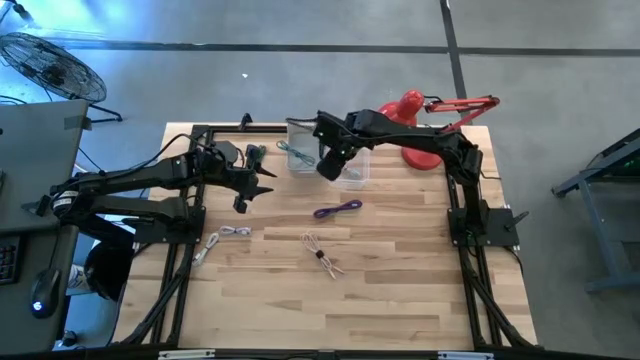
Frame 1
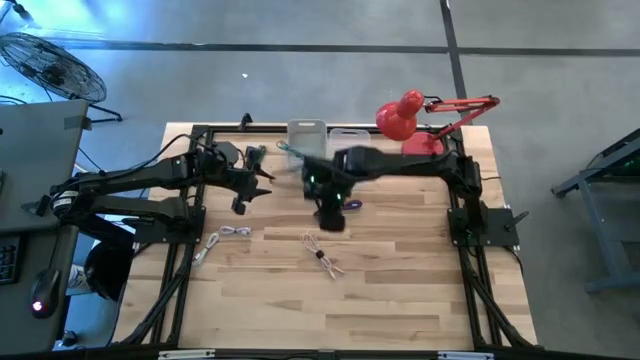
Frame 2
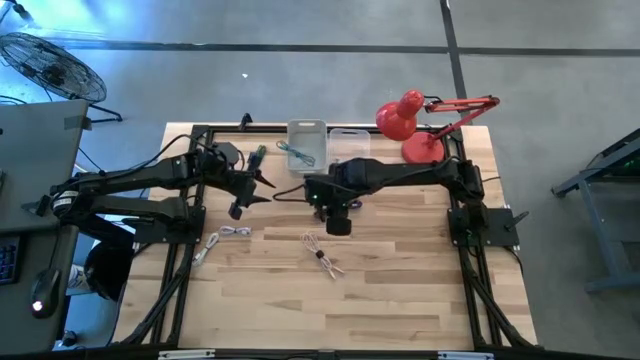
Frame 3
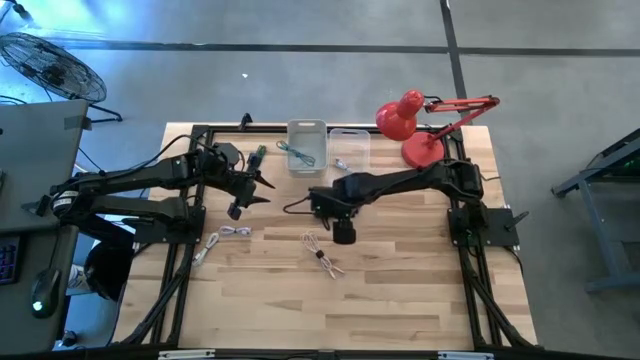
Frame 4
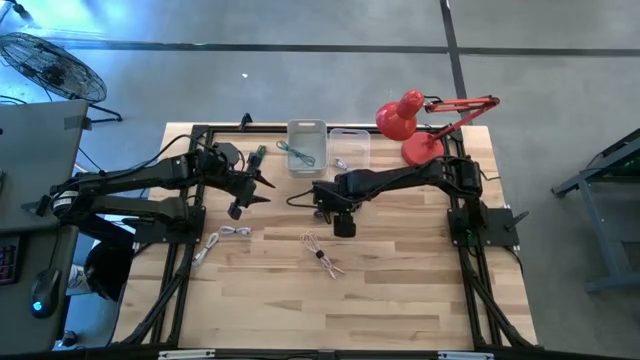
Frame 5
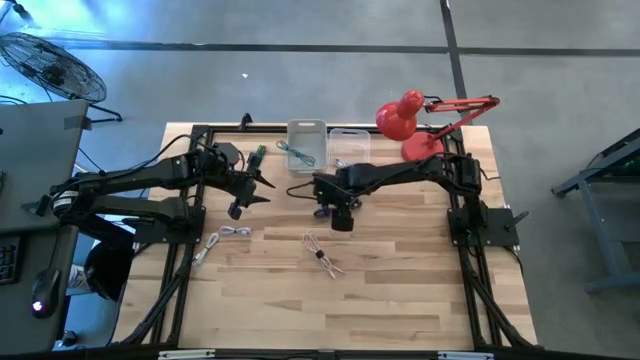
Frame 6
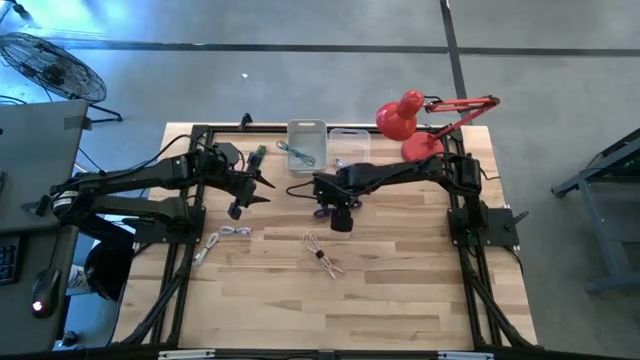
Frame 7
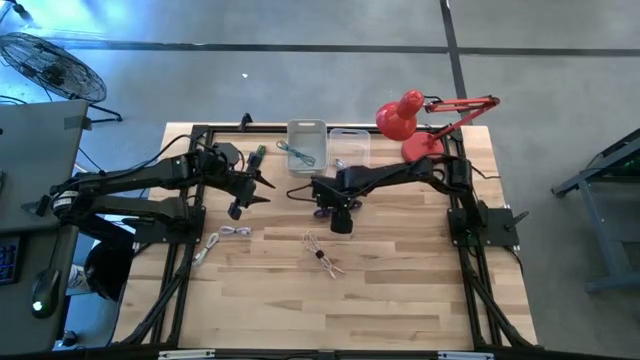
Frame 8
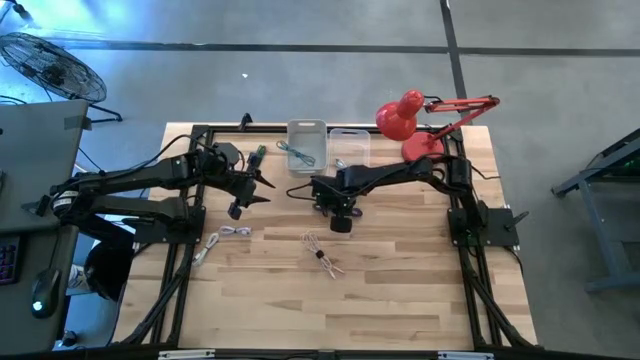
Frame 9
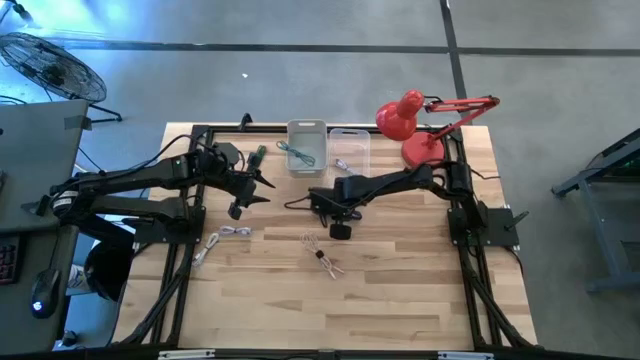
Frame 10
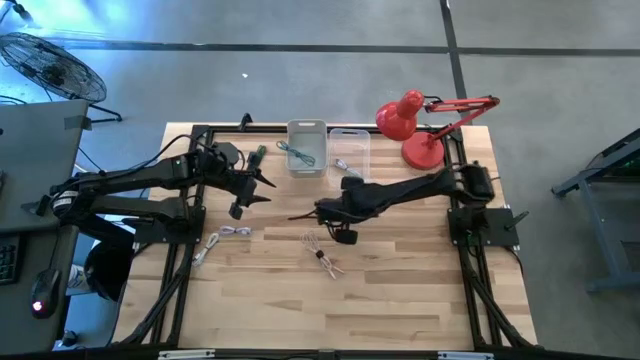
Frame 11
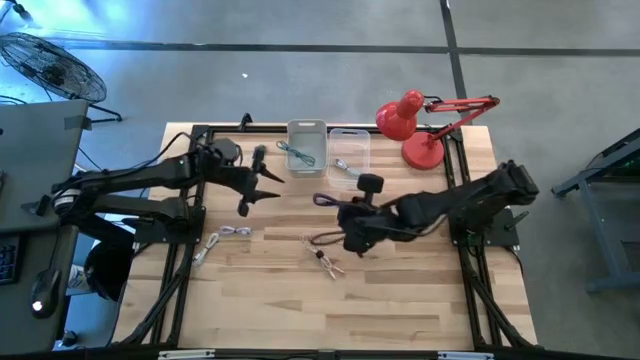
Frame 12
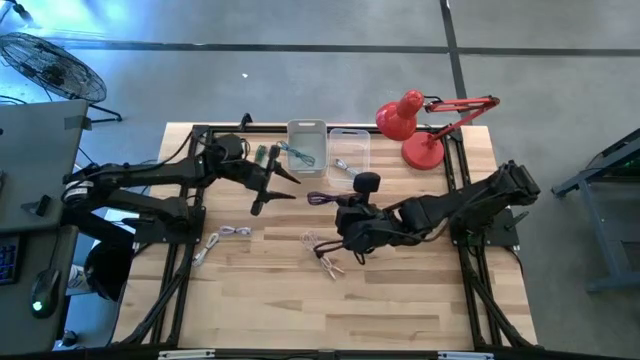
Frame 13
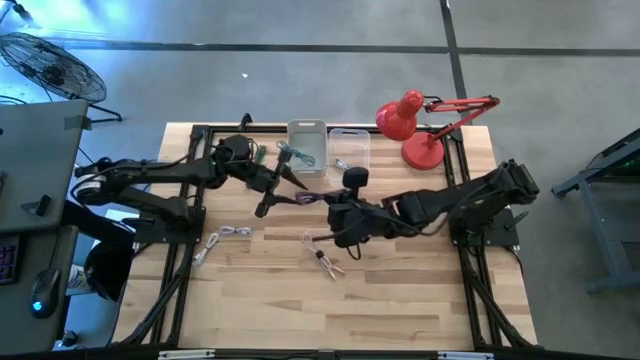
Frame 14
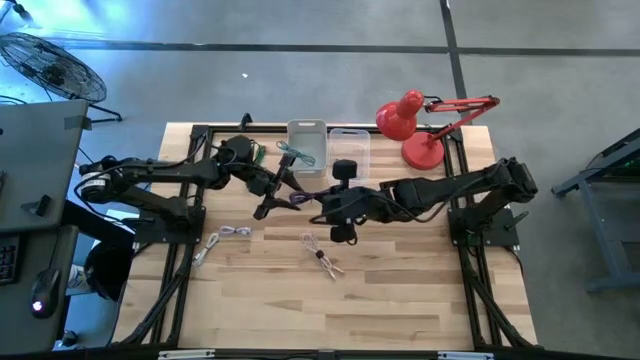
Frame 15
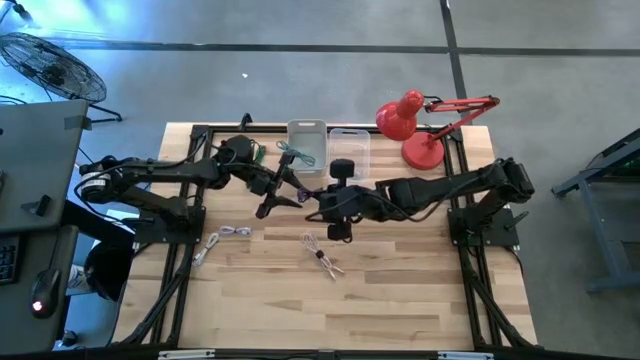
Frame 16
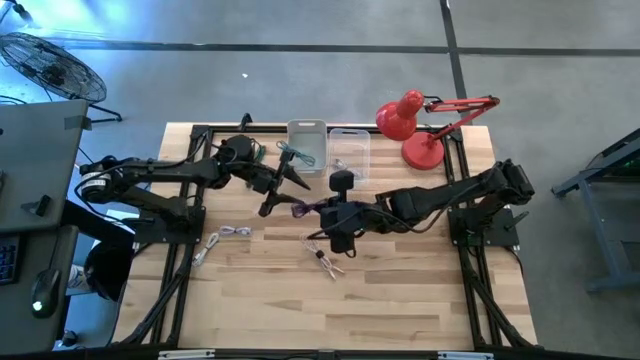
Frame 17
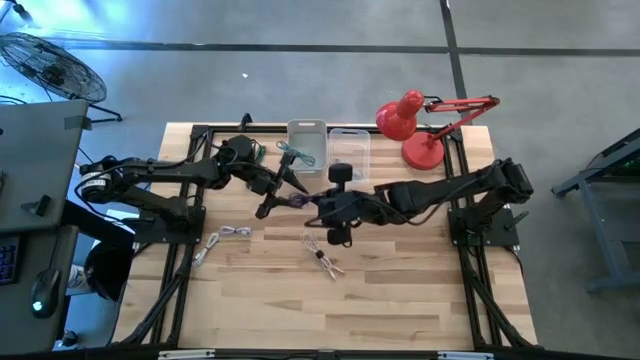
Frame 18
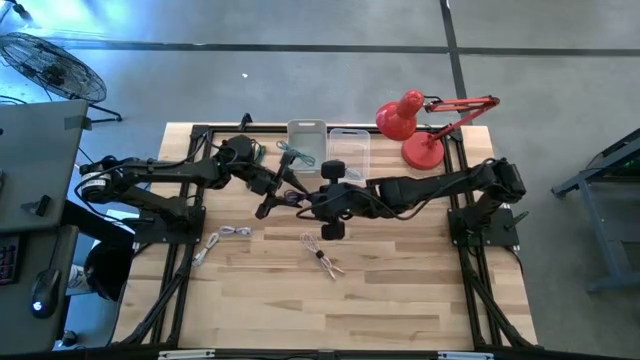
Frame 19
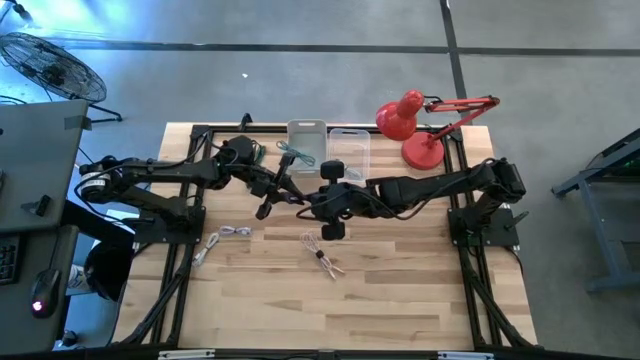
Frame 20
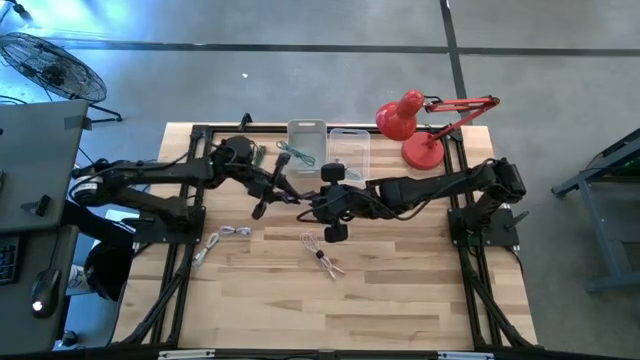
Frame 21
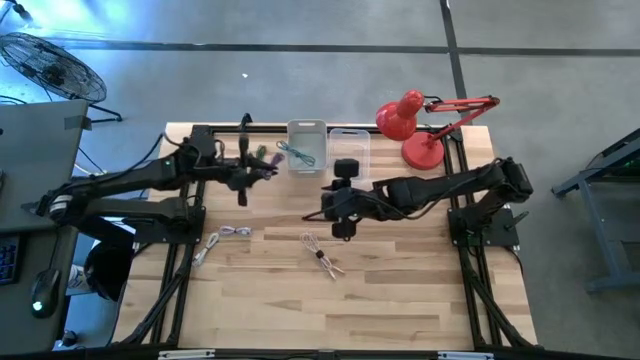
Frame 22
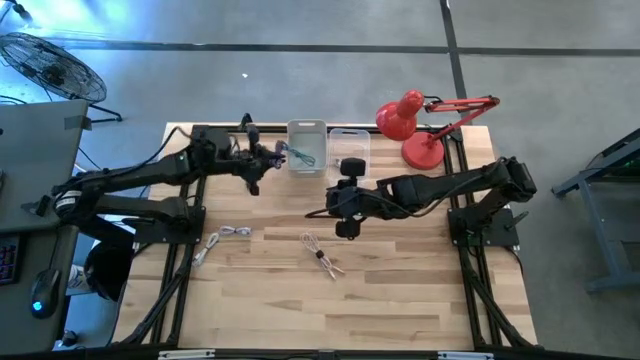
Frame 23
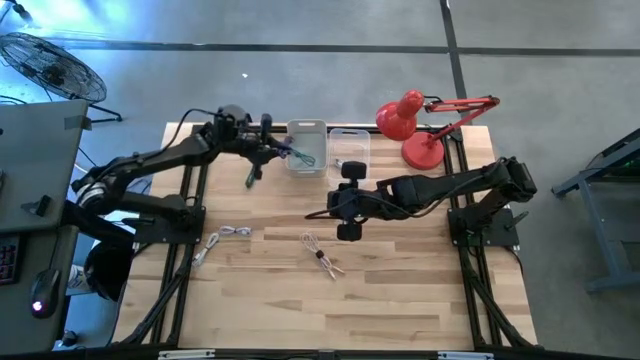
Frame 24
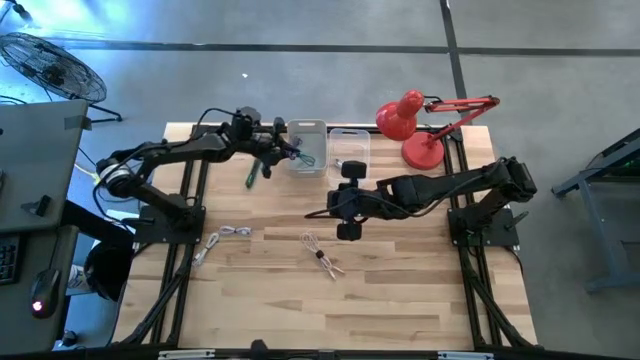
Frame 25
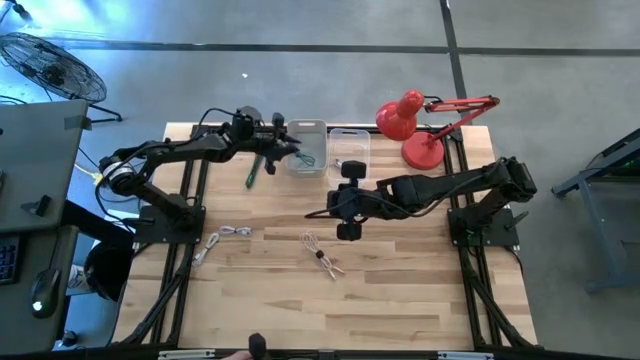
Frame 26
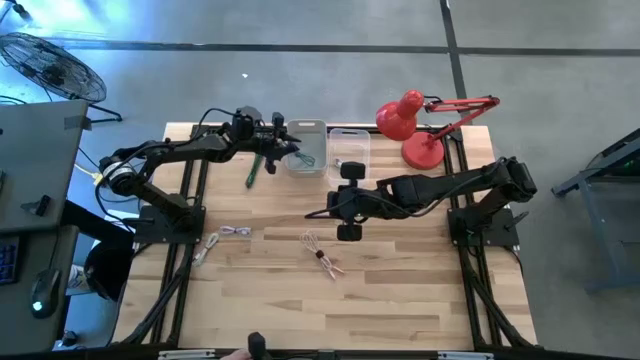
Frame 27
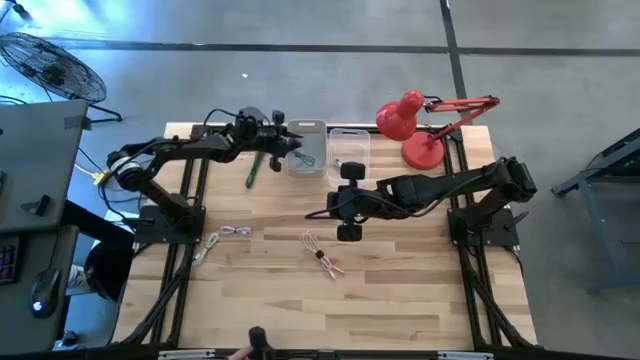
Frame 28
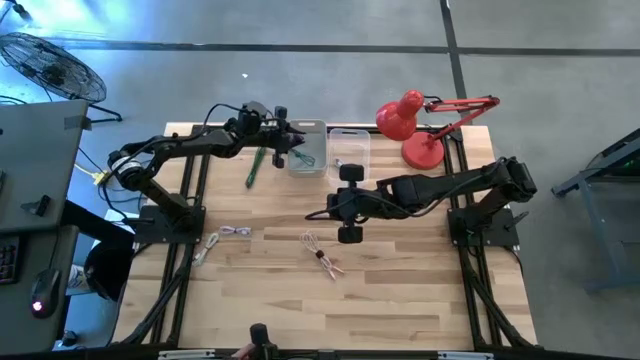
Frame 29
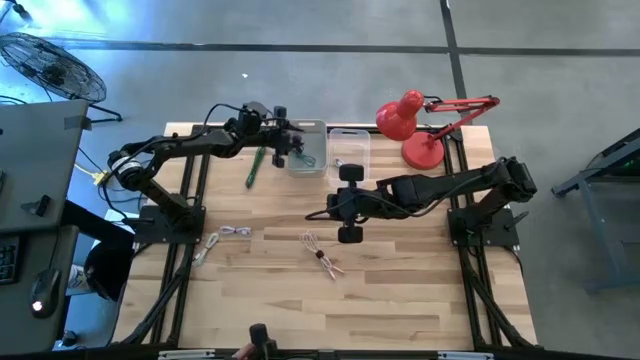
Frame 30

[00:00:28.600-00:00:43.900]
Task: Pick & Place USB Port
Put the purple patterned charger cable into the gray bin

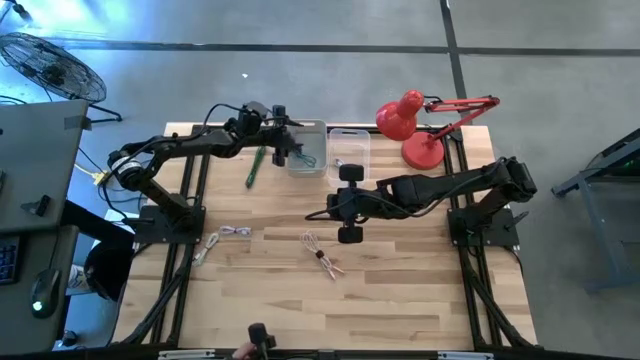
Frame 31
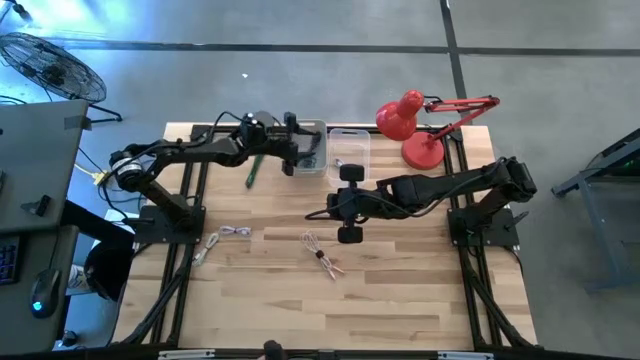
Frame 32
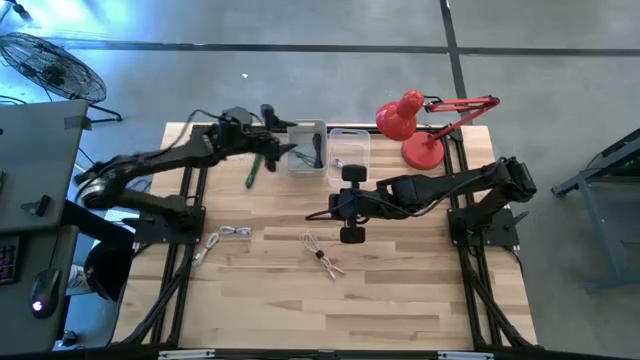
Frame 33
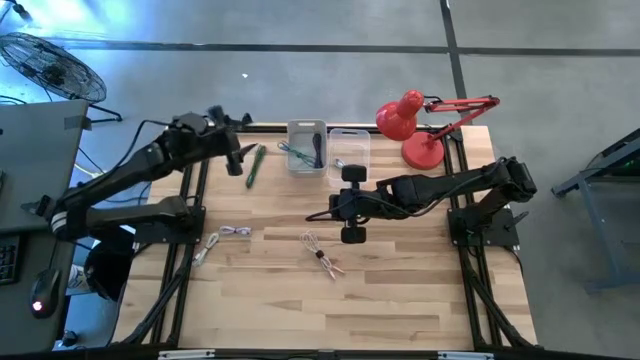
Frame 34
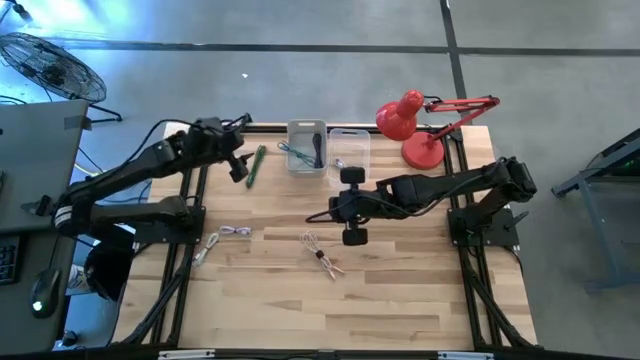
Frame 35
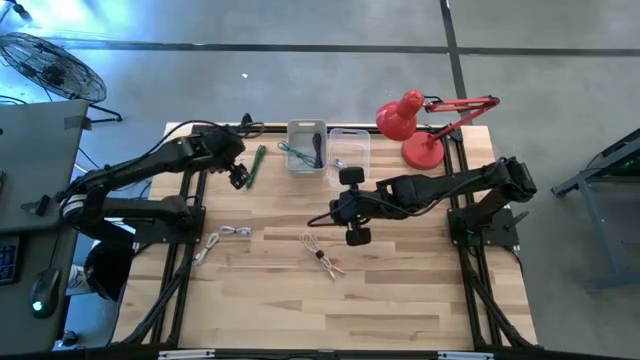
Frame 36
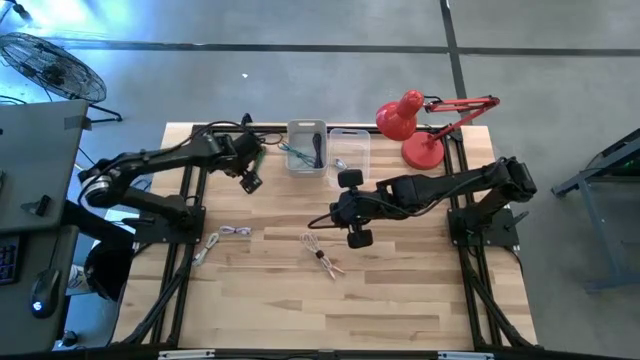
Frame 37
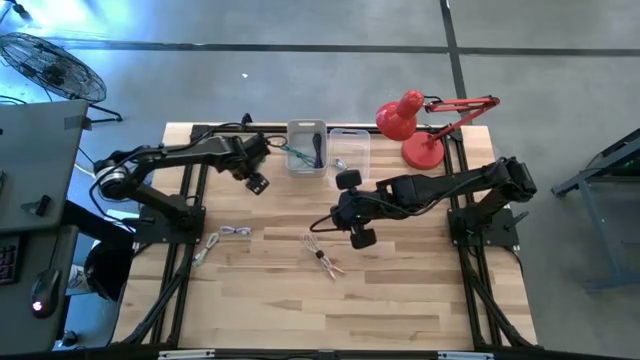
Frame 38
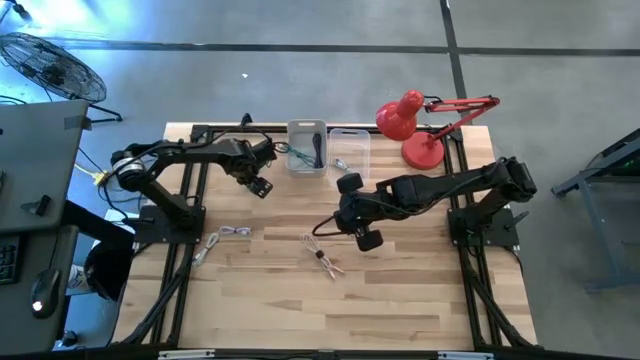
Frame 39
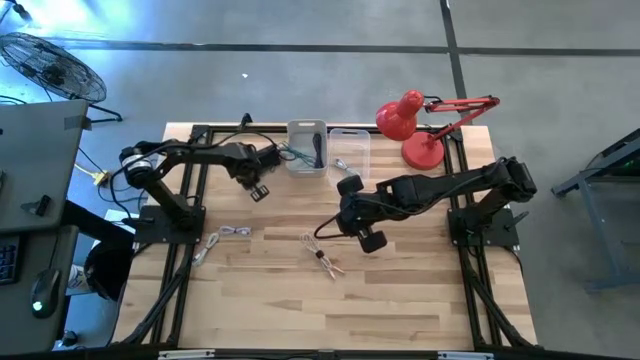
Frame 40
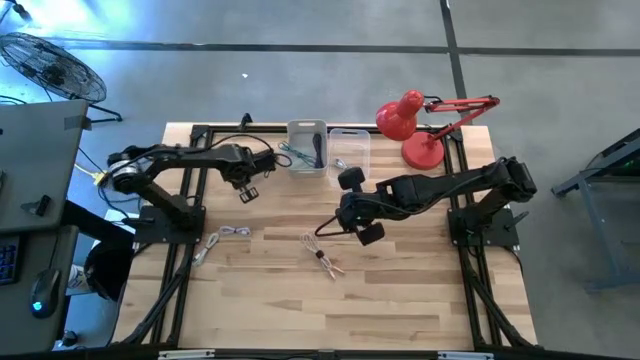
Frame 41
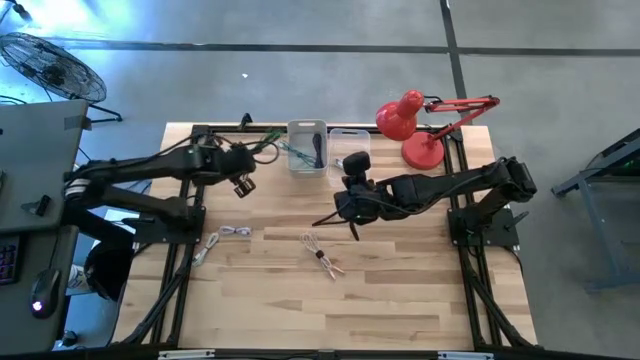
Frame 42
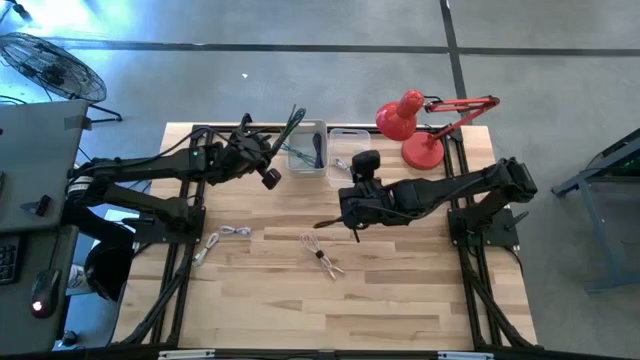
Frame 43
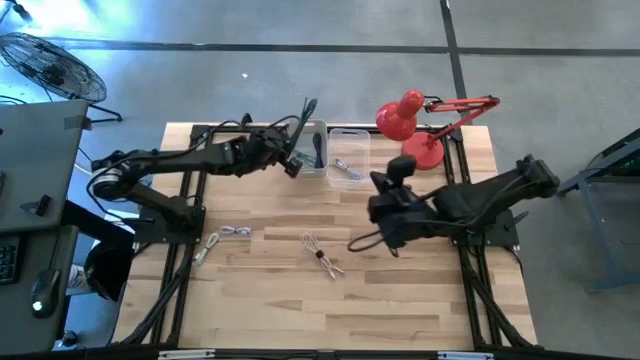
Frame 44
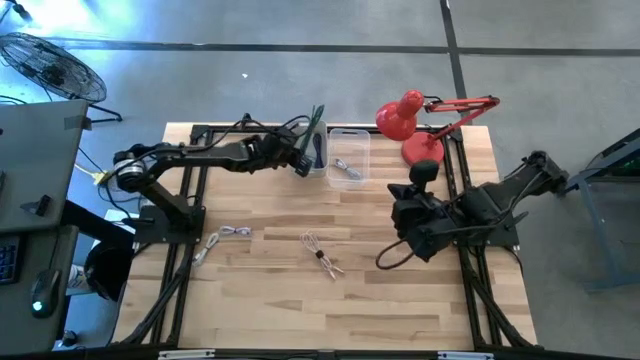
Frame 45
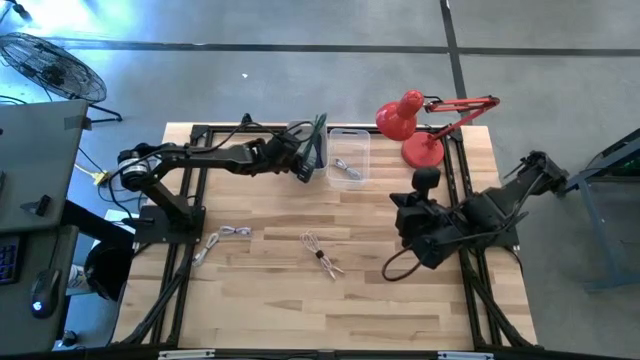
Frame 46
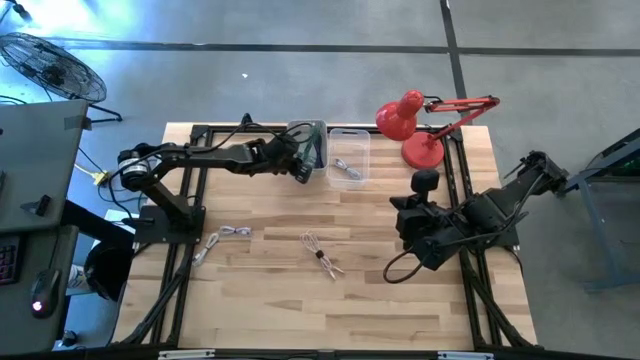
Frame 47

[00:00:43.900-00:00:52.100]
Put the green patterned charger cable into the gray bin
